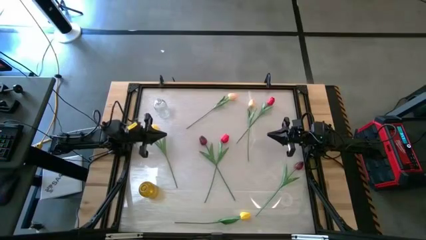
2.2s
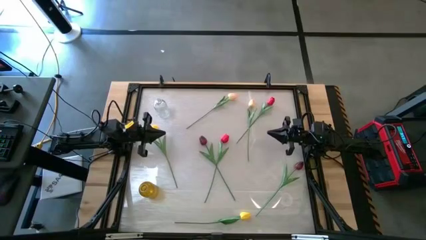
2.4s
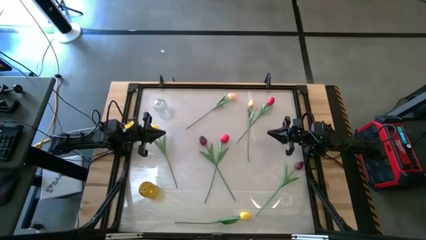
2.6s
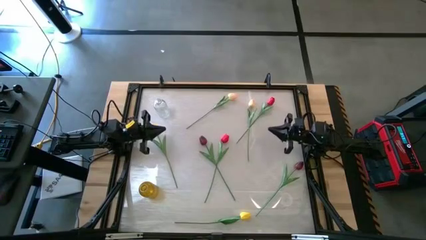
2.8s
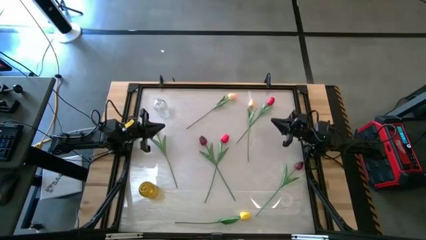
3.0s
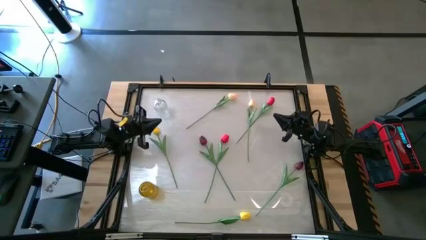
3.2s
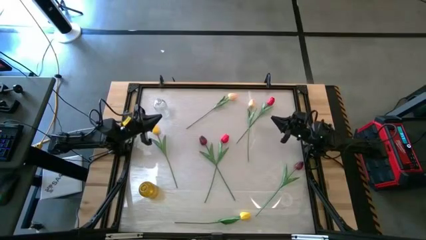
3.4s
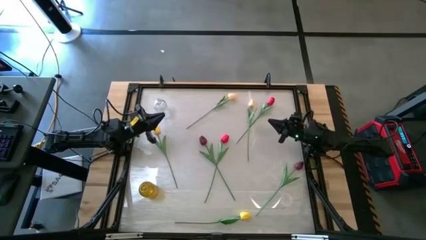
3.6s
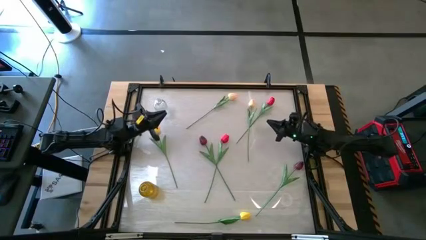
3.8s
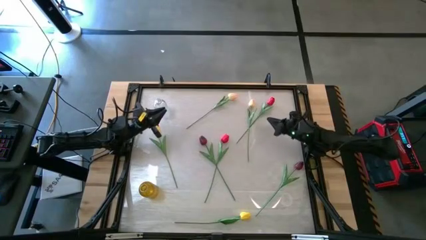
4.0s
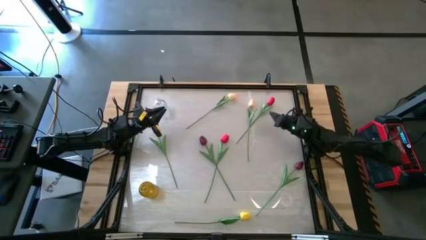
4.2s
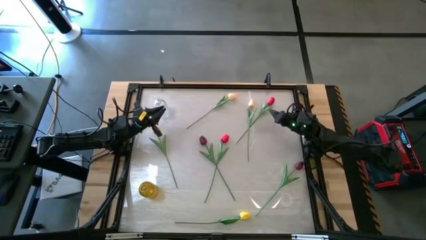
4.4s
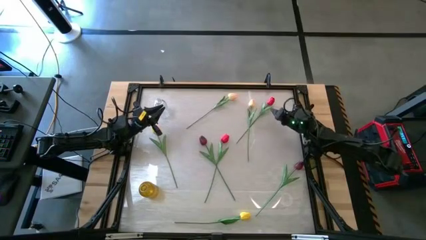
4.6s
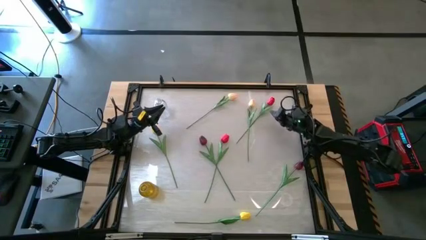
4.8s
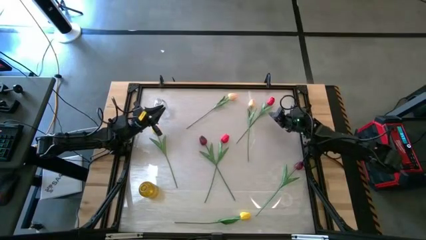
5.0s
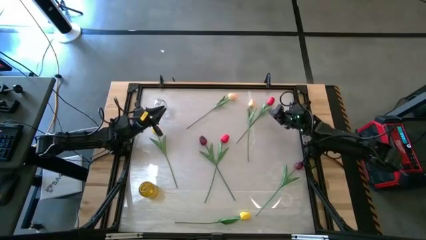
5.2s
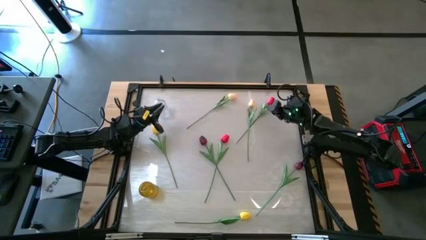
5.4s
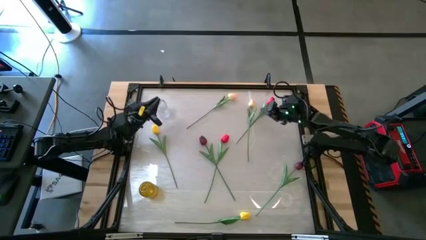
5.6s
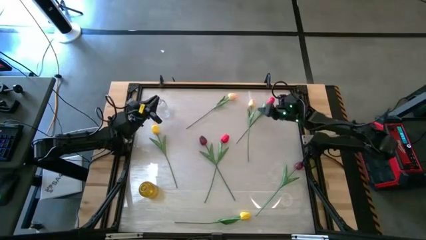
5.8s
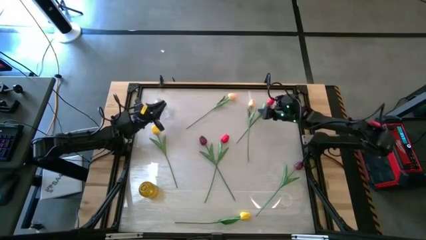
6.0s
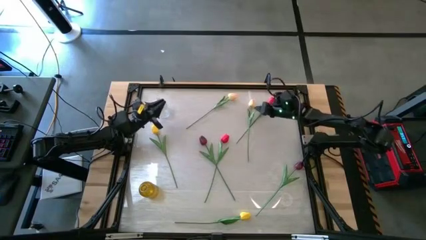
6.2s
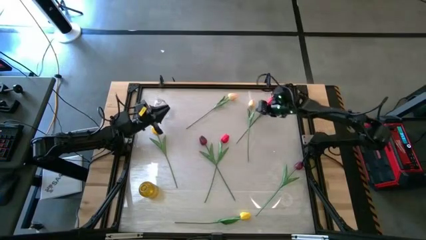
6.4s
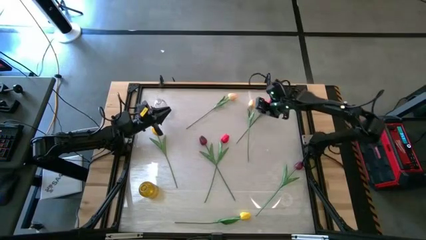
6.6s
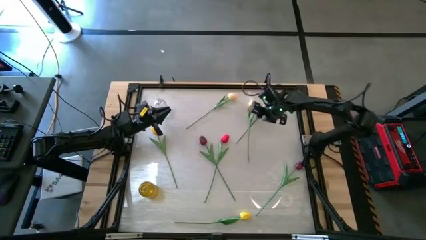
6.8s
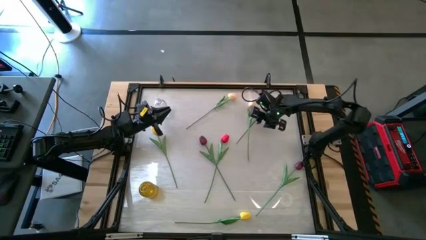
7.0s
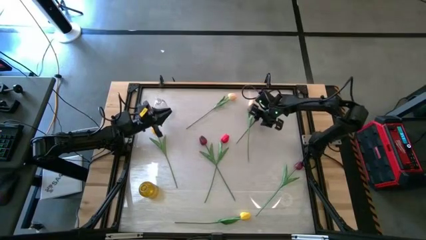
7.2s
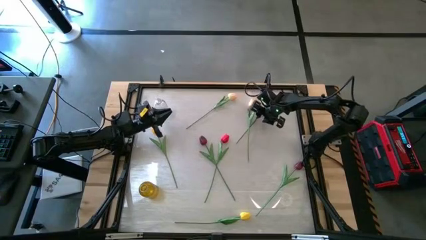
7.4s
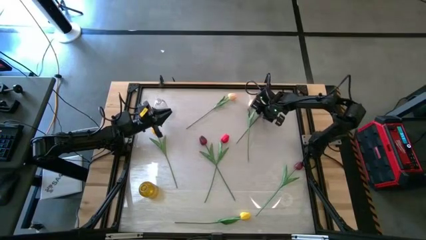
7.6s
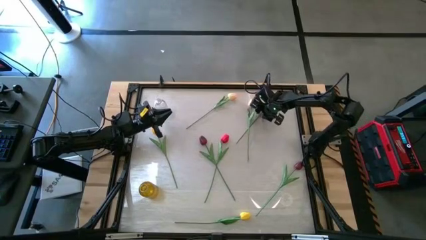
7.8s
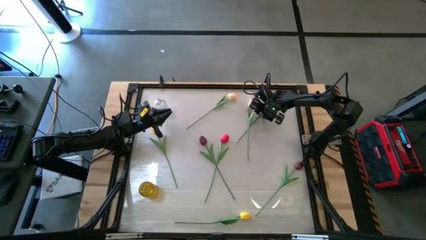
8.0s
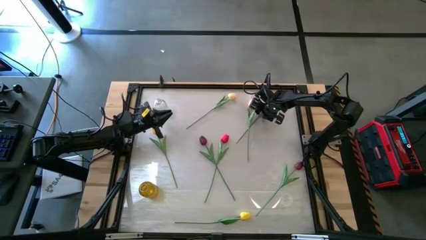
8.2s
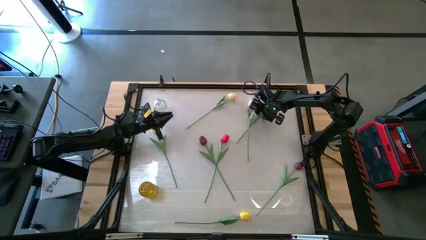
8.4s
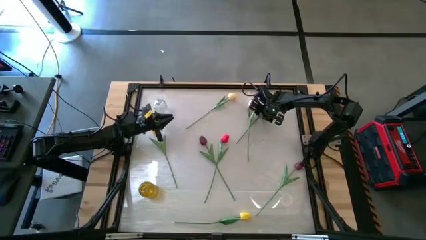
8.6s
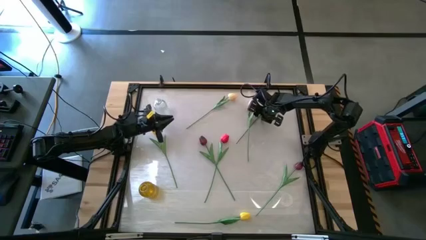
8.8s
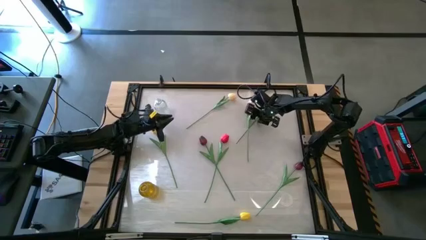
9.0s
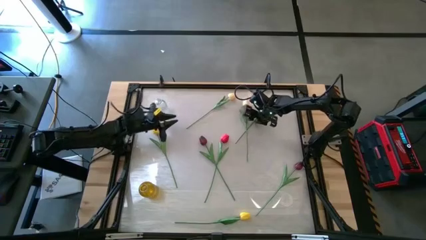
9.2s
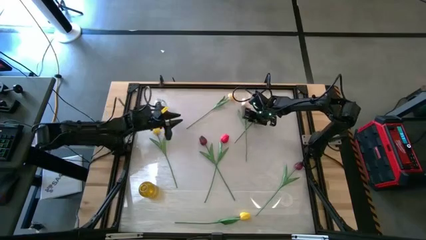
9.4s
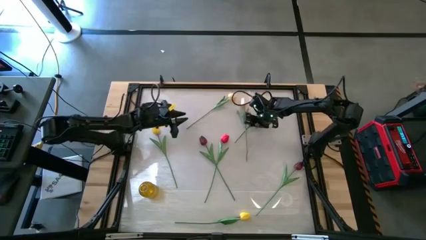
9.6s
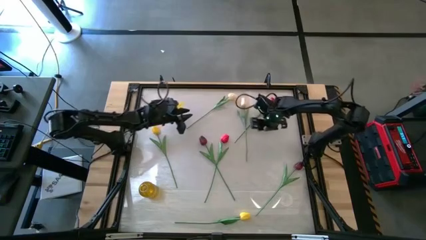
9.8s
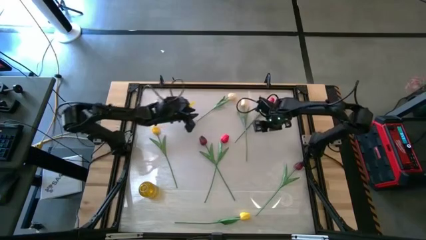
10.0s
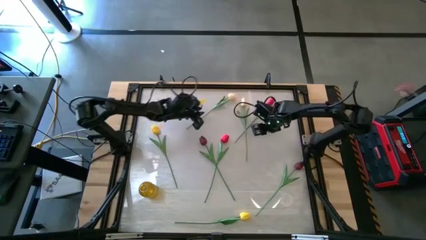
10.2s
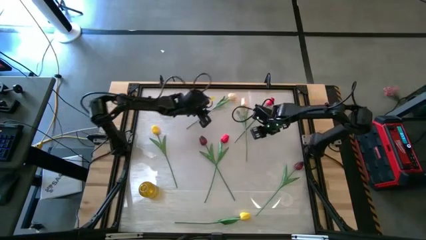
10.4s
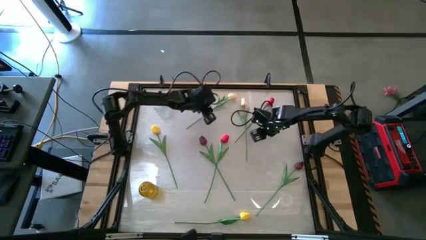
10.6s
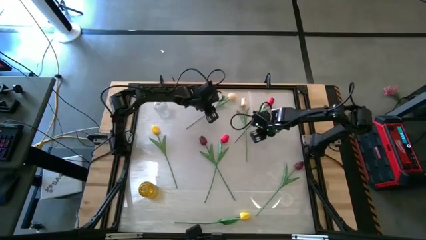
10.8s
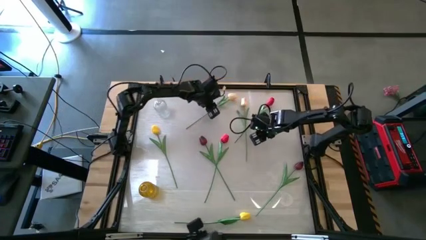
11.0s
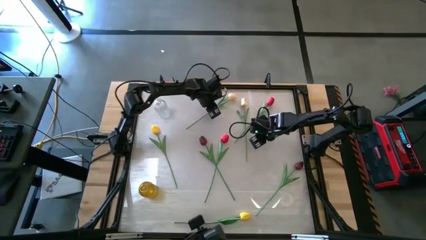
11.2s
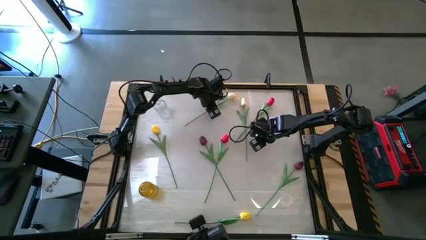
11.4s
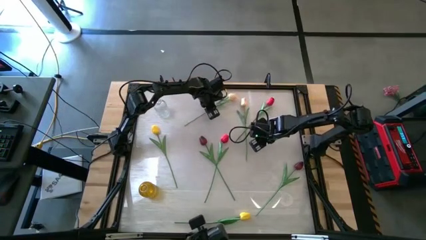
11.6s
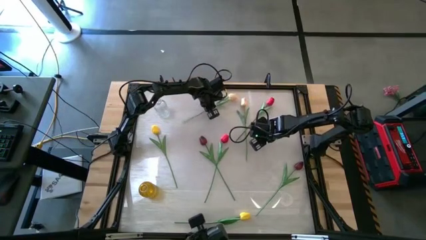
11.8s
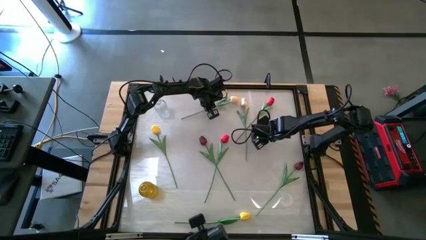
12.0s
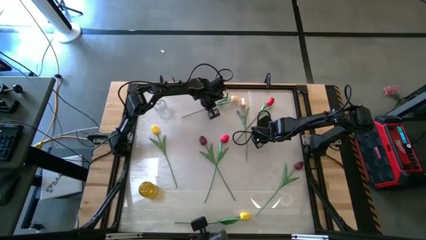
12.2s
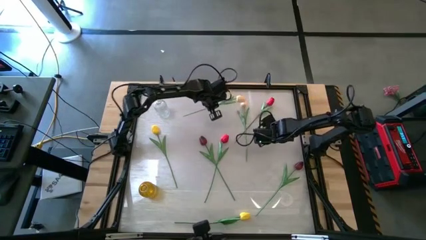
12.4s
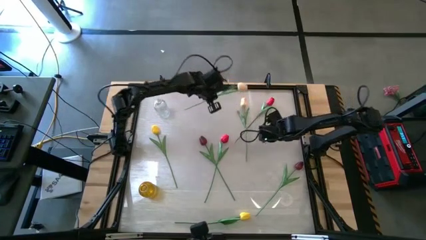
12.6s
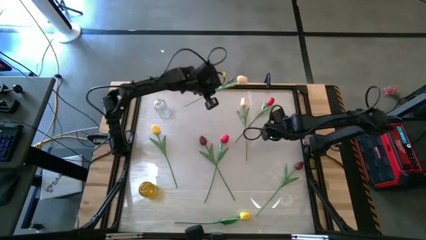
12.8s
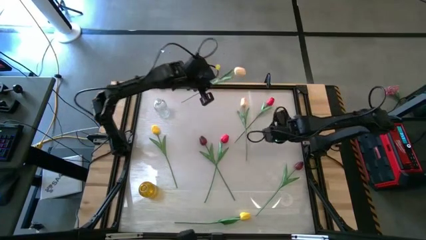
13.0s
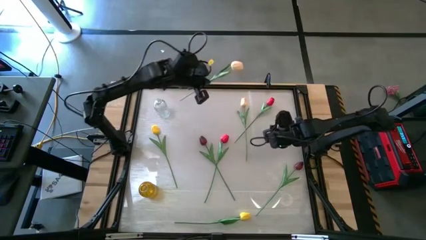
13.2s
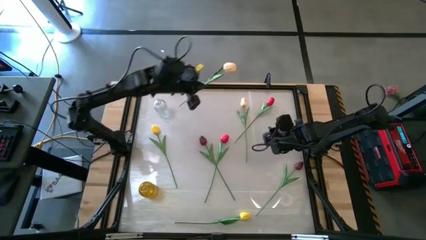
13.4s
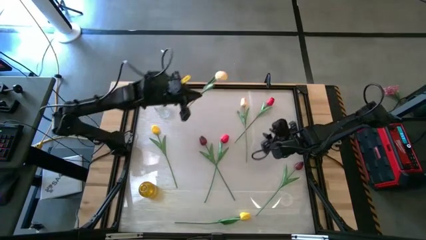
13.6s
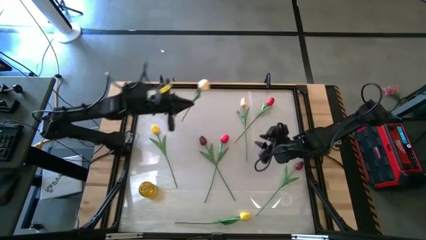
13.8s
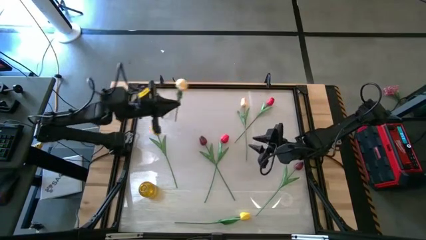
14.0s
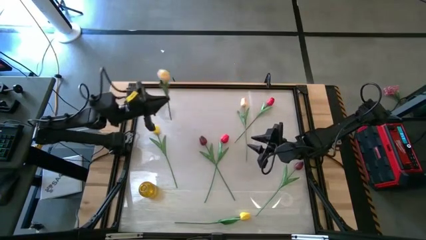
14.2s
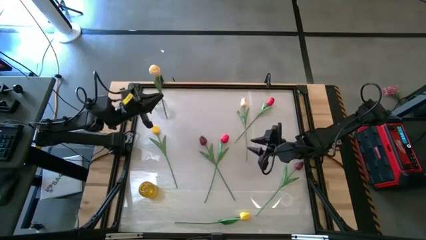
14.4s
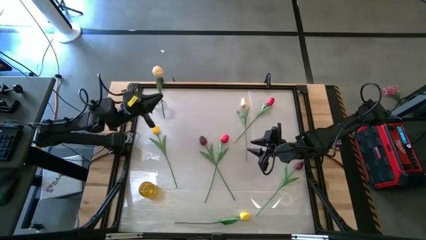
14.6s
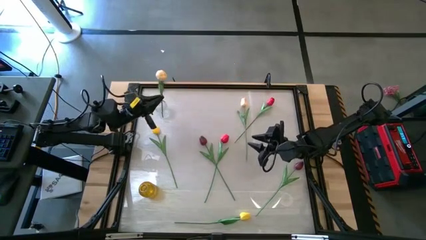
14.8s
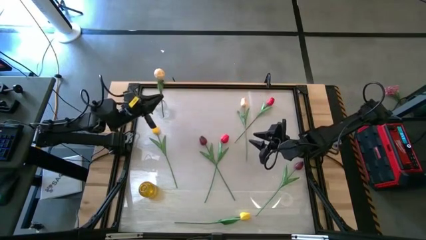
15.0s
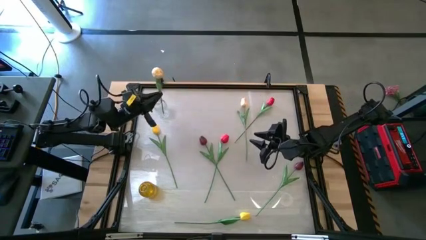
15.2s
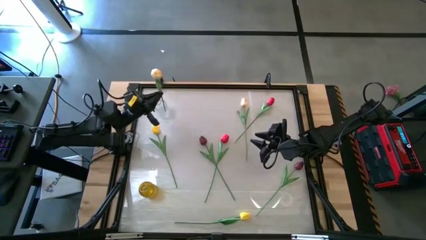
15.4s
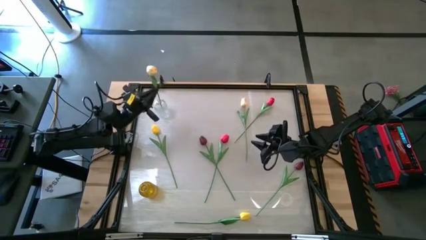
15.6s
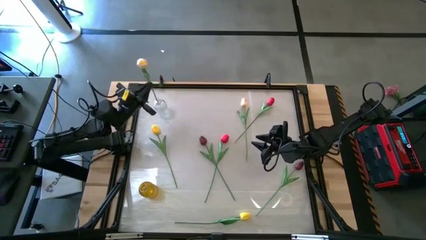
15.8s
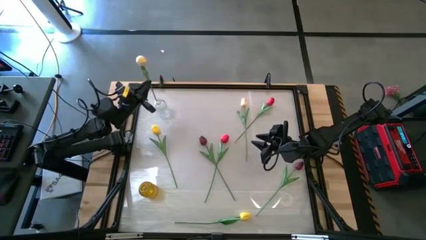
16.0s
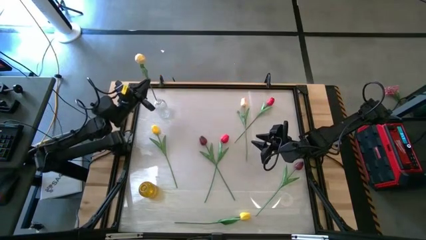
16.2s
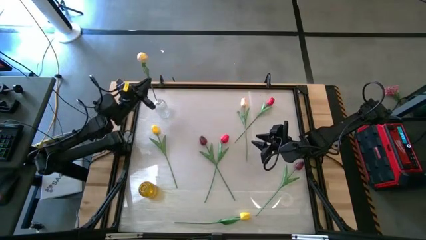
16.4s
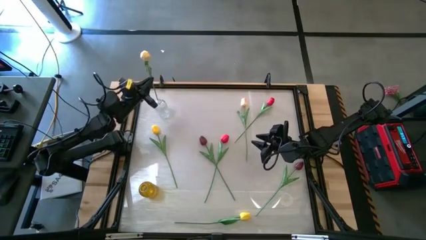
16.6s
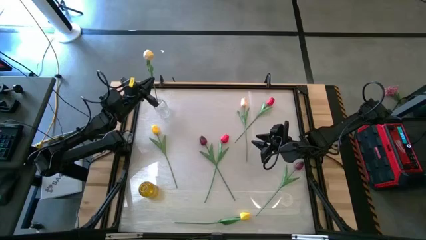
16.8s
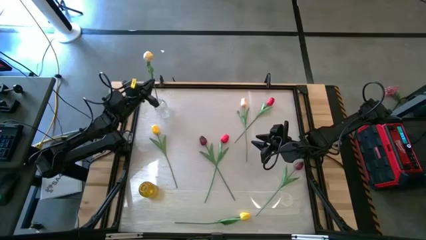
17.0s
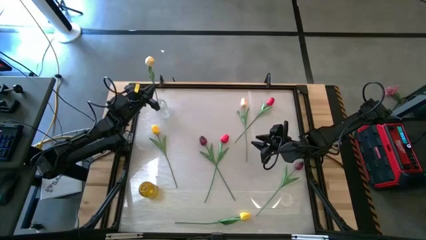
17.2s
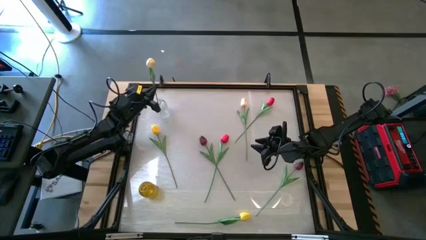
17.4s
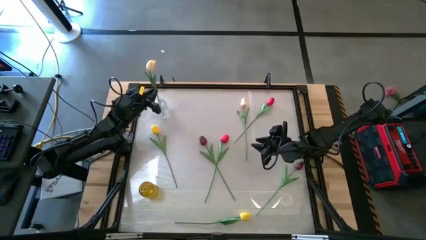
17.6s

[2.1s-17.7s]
Task: Sort flowers into vase by color
Put the light yellow tulip into the transparent vase
